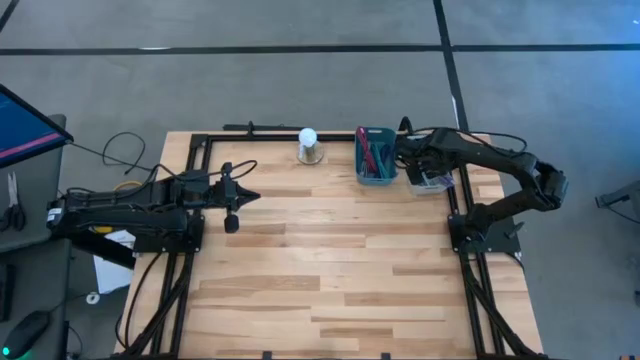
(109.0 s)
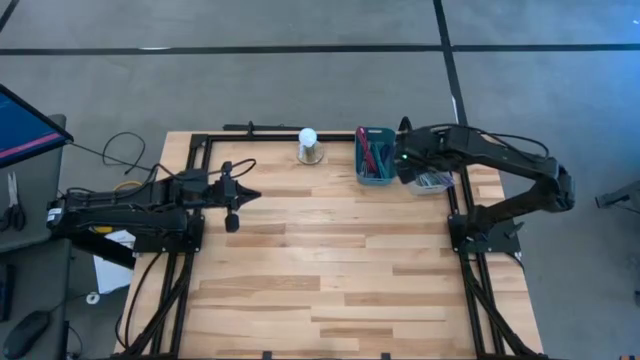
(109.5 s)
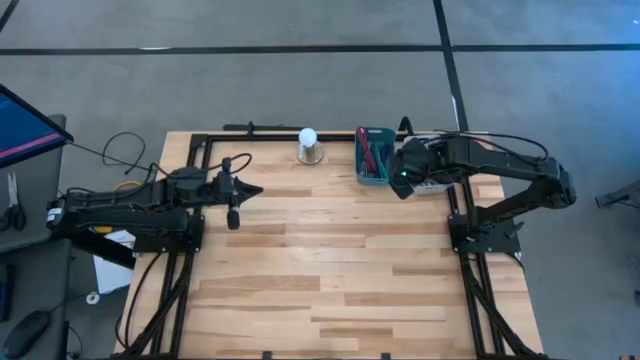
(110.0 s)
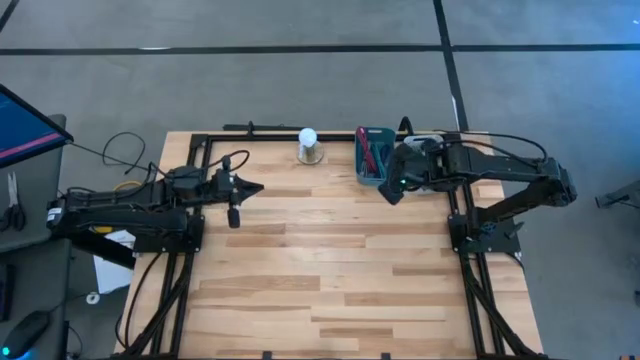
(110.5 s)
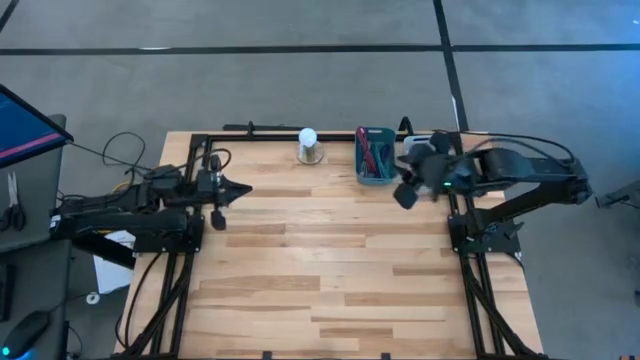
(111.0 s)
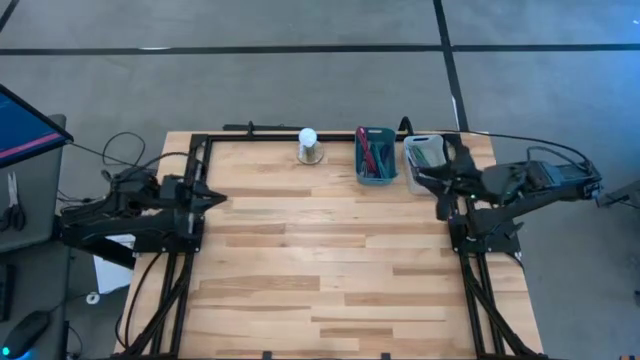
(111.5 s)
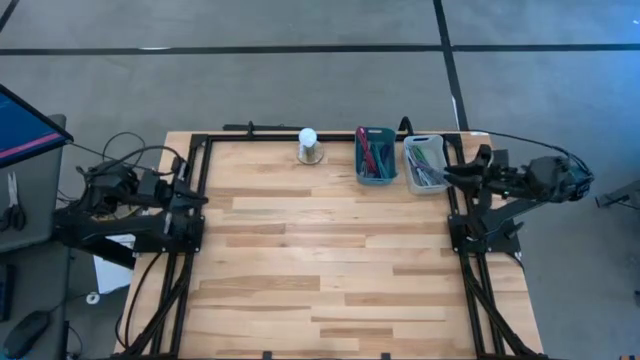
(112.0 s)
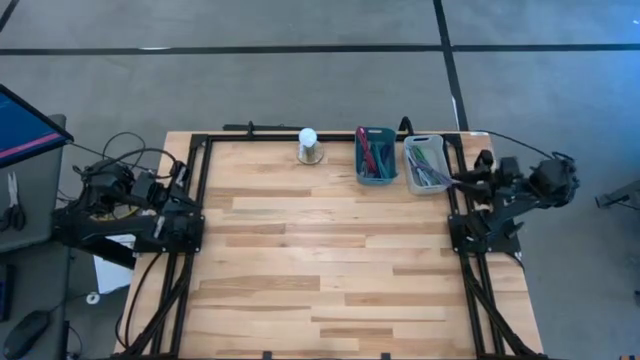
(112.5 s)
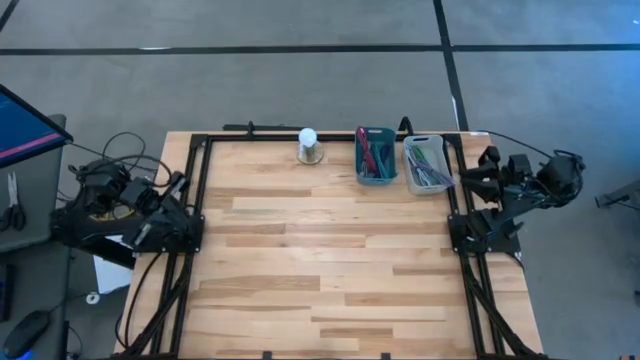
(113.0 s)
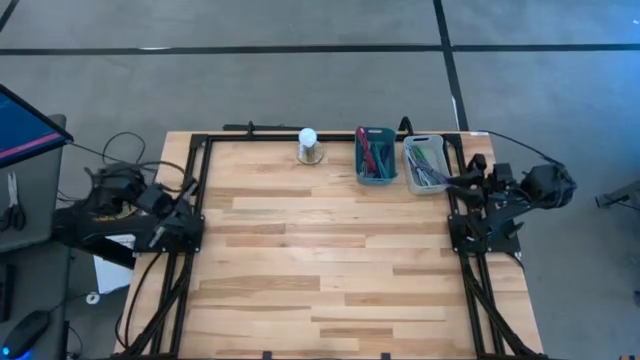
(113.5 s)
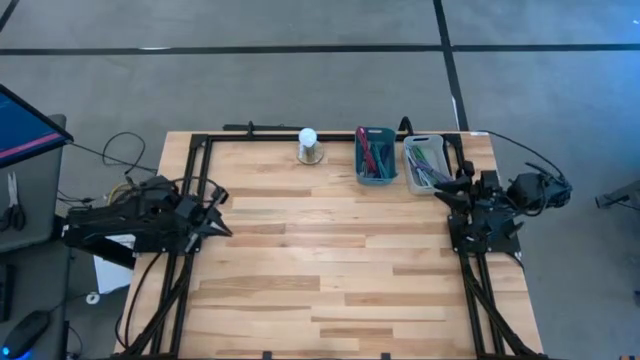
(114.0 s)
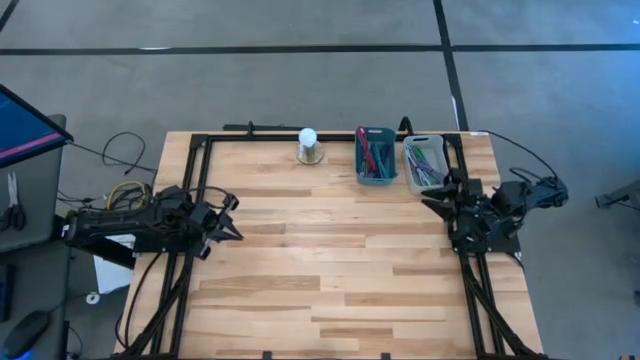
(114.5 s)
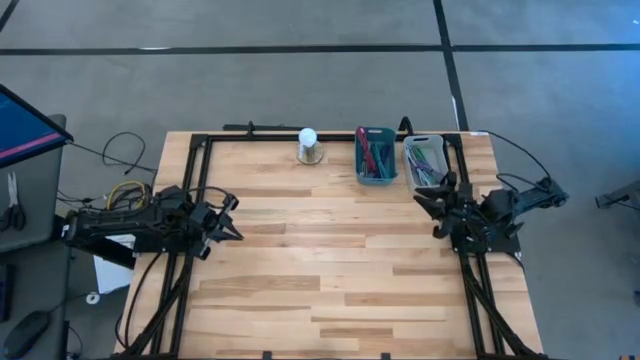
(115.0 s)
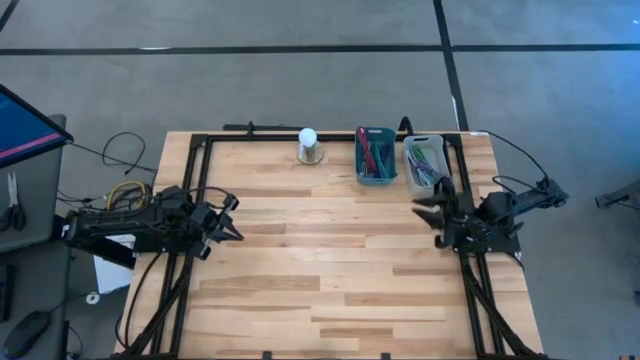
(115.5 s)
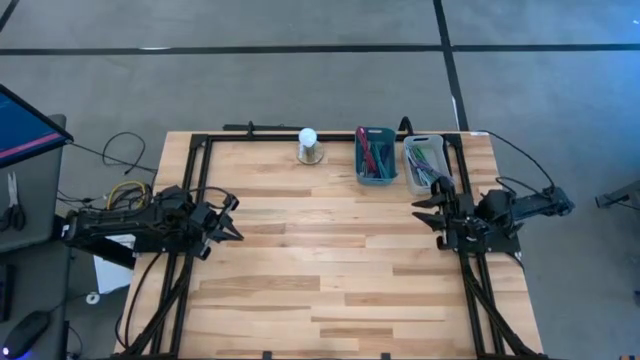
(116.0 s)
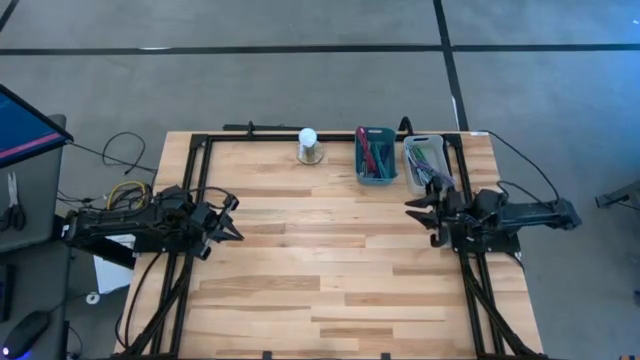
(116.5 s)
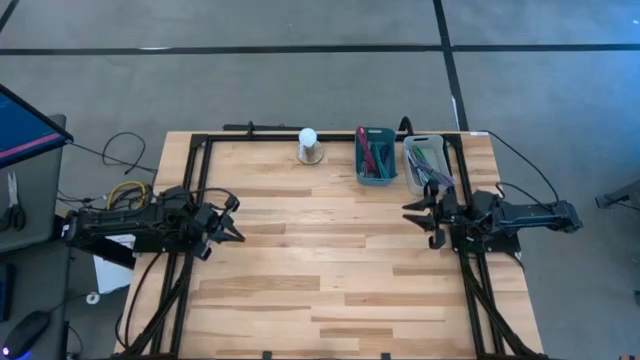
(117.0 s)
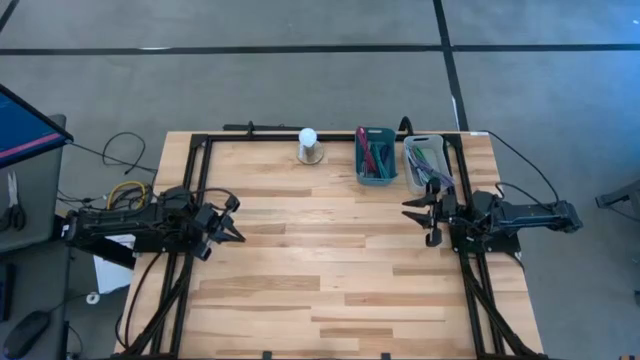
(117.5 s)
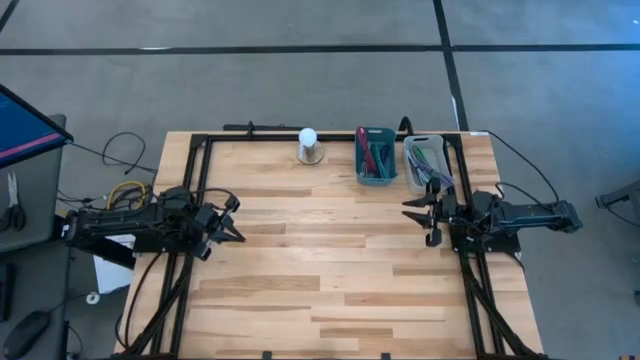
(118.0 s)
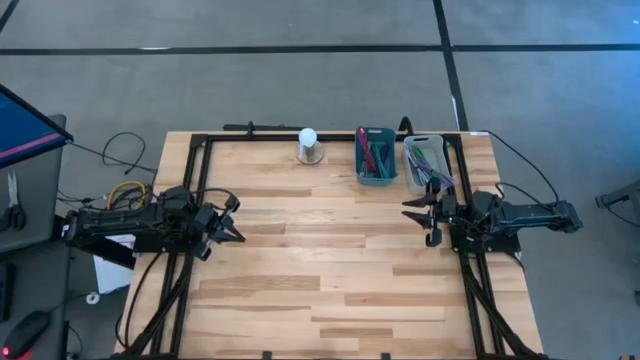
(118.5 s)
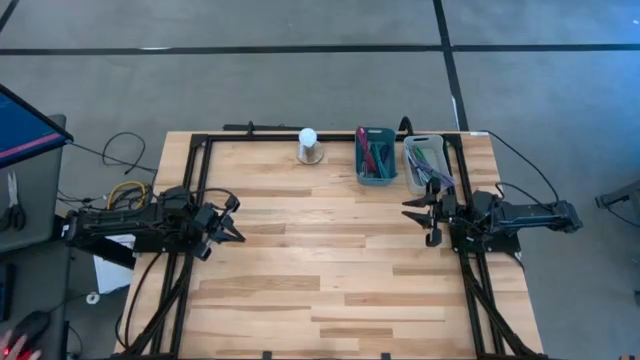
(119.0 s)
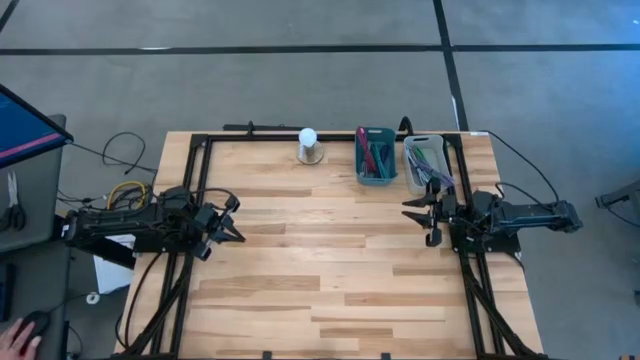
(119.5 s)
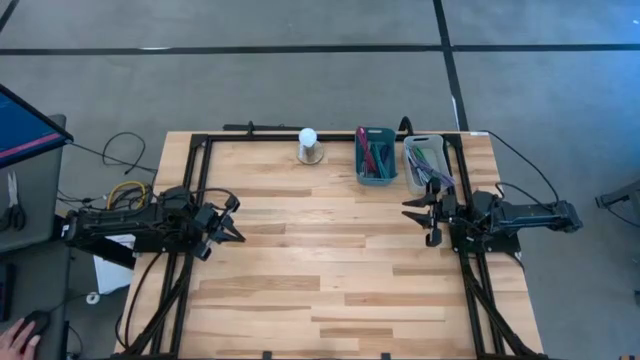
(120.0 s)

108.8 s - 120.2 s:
Task: Pick & Place USB Port
Return to Home Position

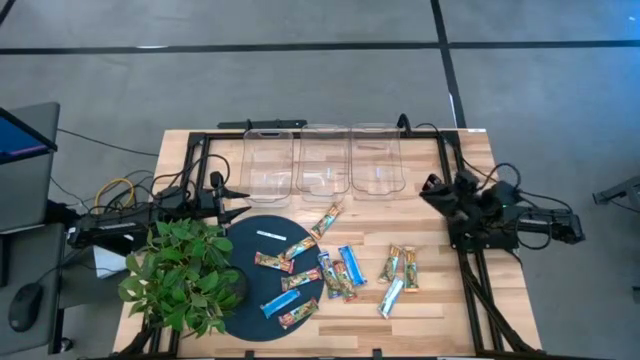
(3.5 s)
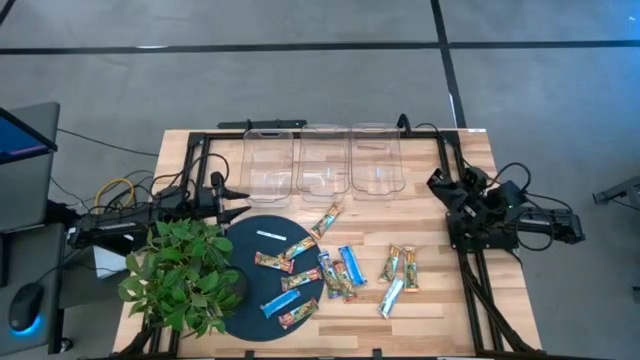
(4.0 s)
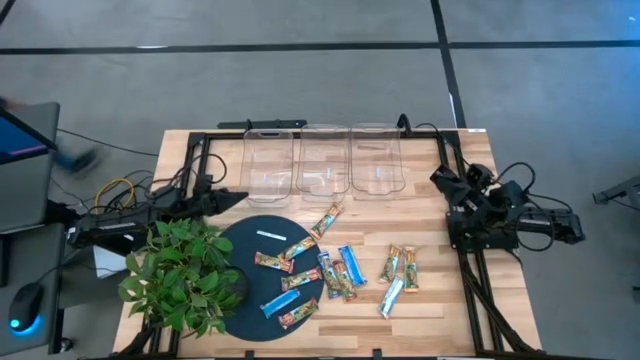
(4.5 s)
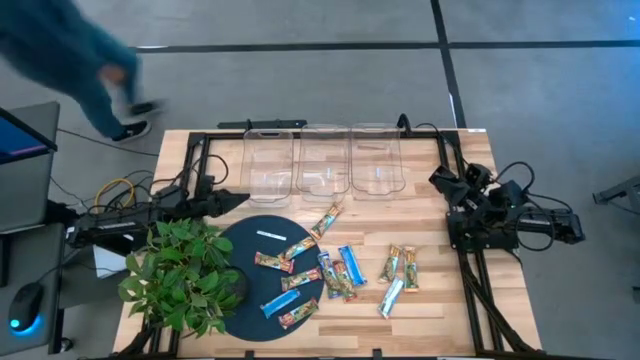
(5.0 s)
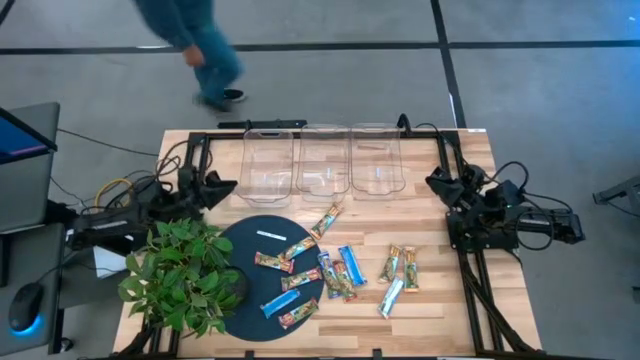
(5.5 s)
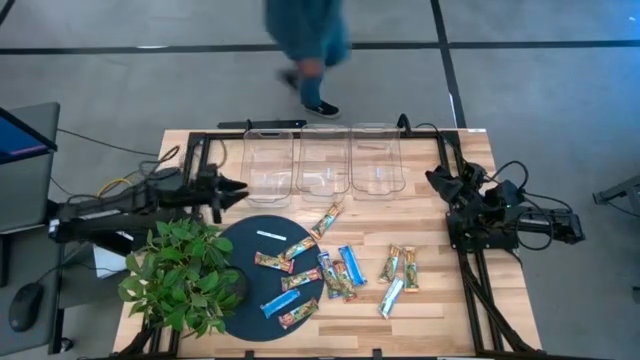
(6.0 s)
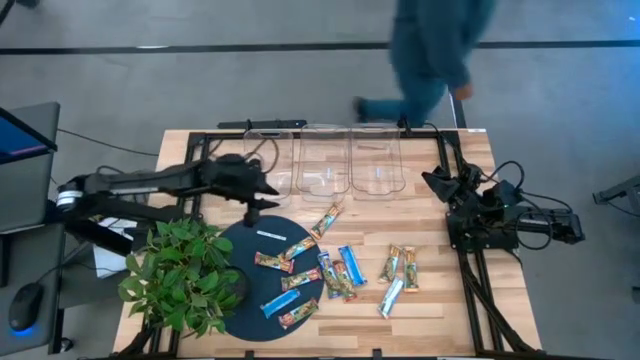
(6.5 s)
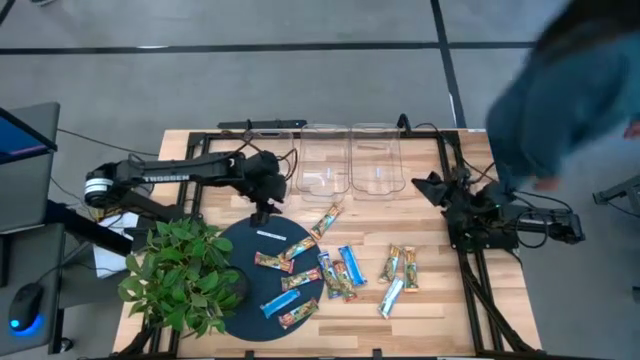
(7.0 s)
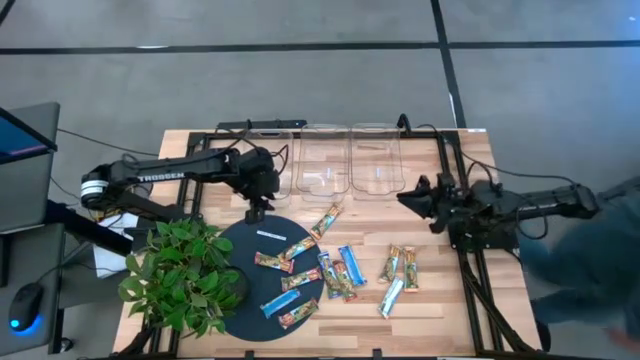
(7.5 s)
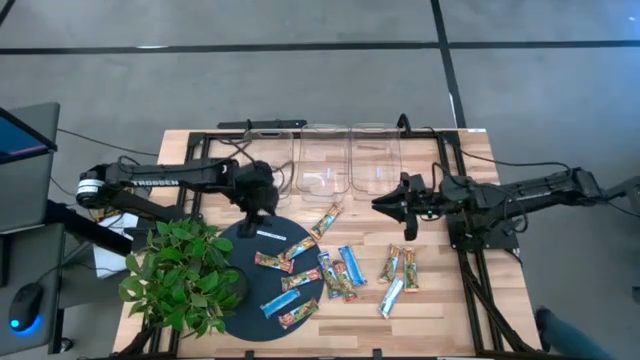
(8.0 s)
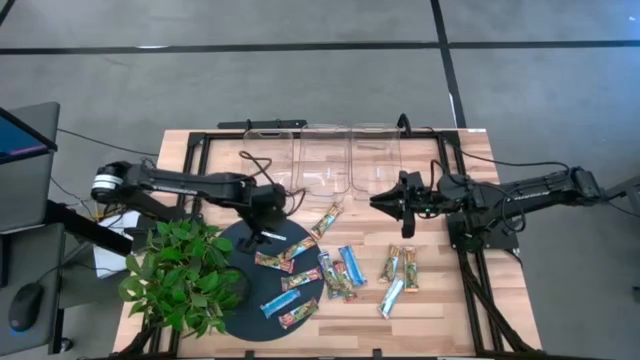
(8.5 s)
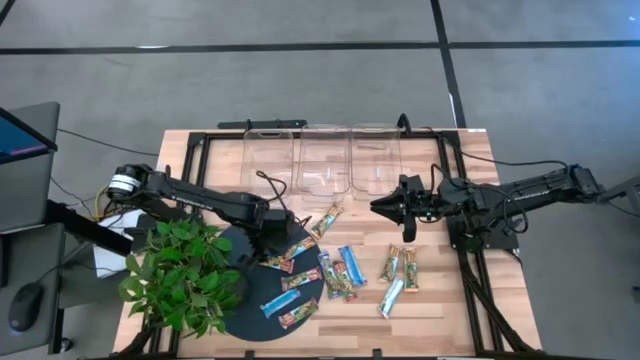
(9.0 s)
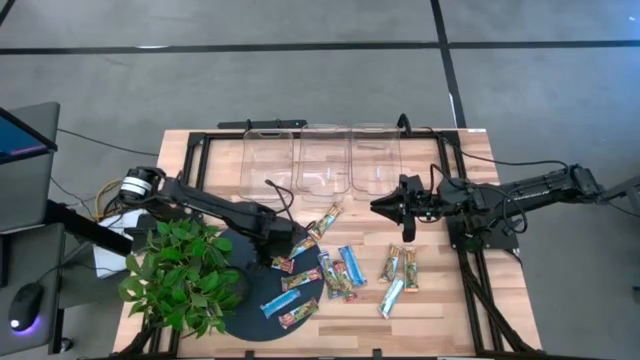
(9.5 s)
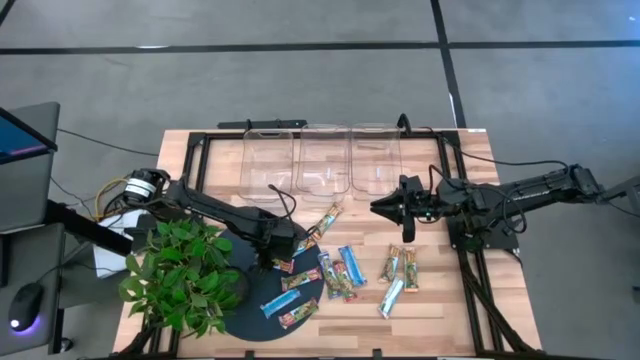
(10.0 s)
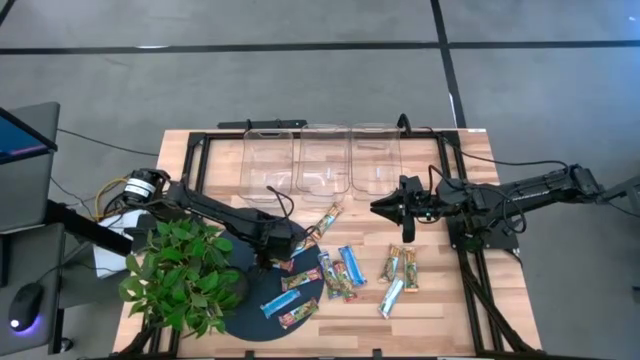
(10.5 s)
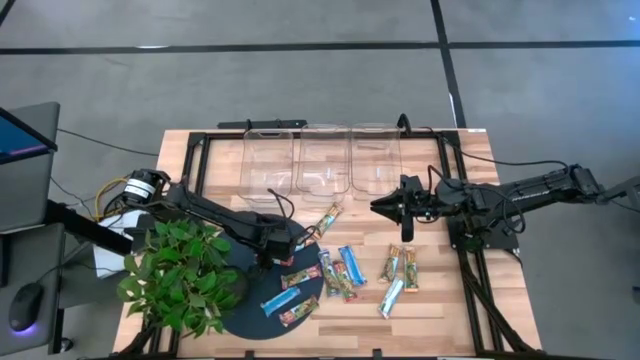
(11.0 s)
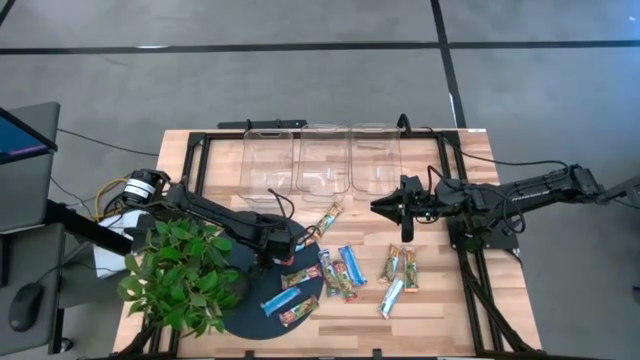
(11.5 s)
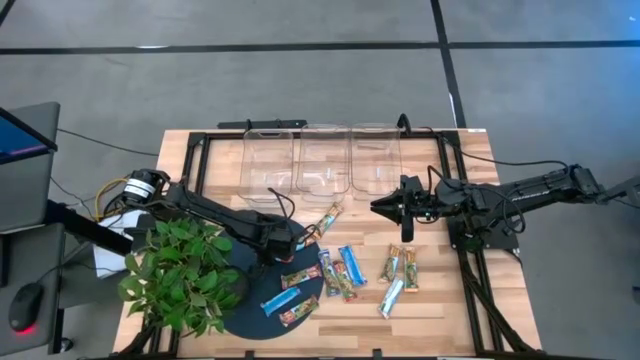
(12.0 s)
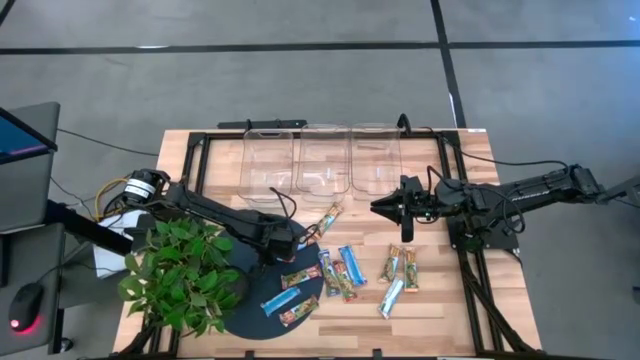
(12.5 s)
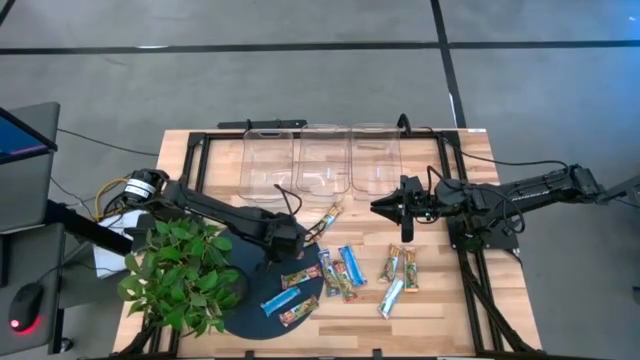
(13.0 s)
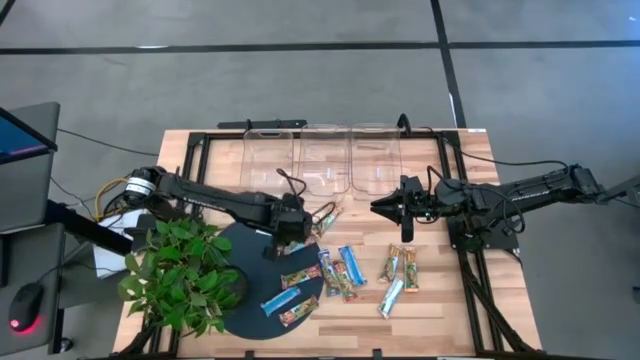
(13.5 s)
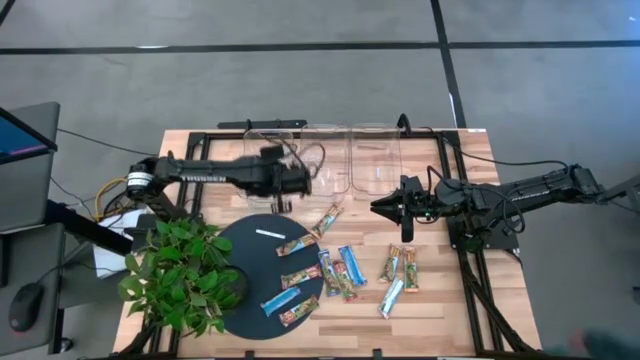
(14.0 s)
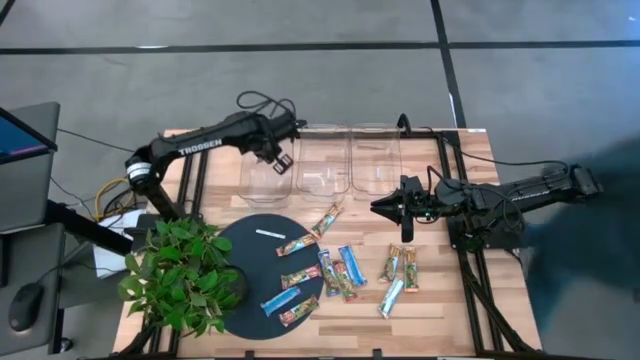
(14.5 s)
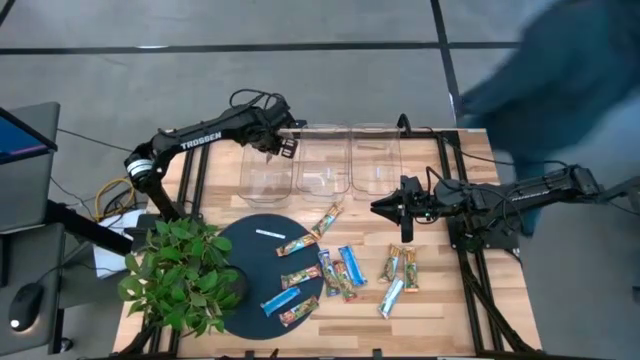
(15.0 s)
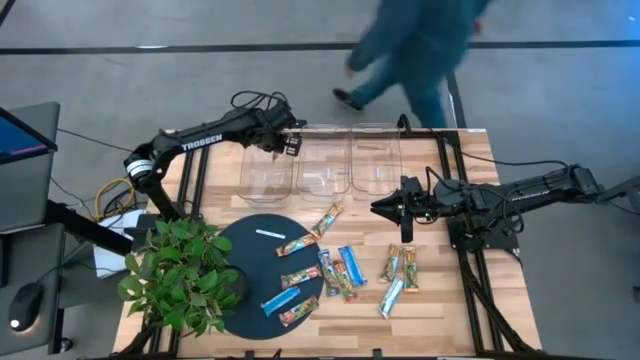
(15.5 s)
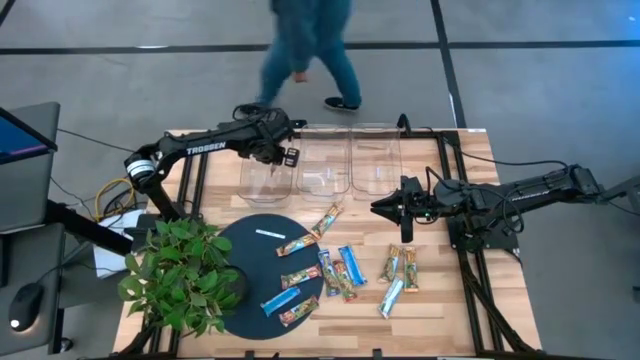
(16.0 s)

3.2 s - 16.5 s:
Task: Pick and place Granola Bars by type
Put the red granola bar into the left transparent bin
